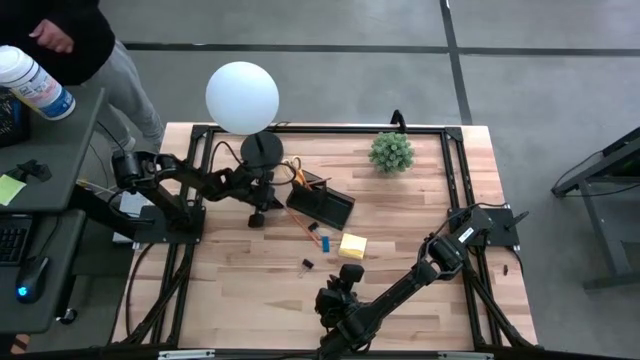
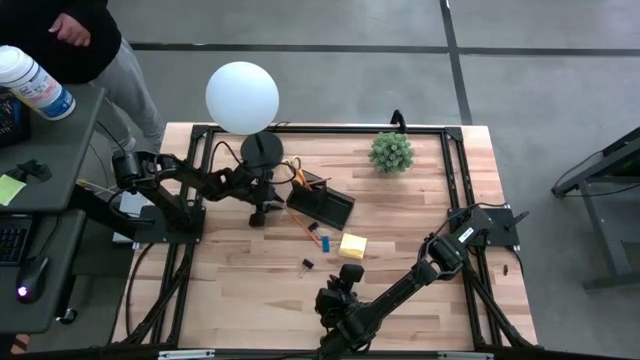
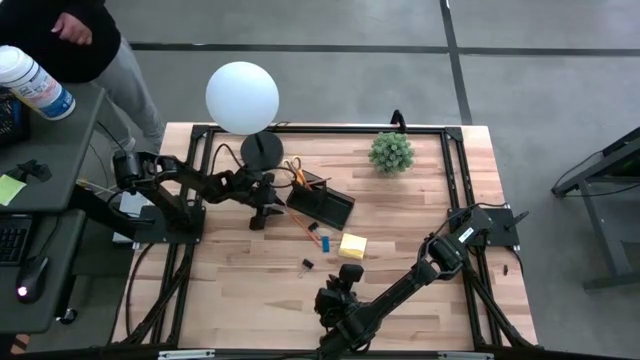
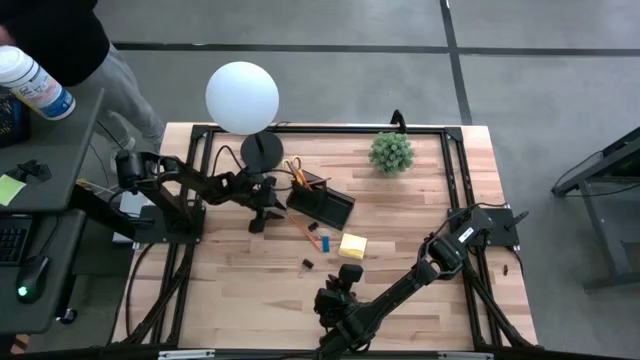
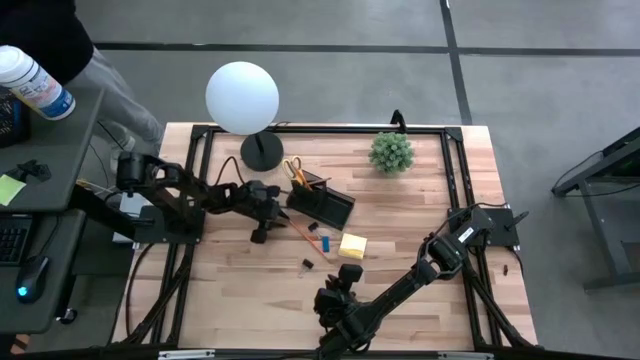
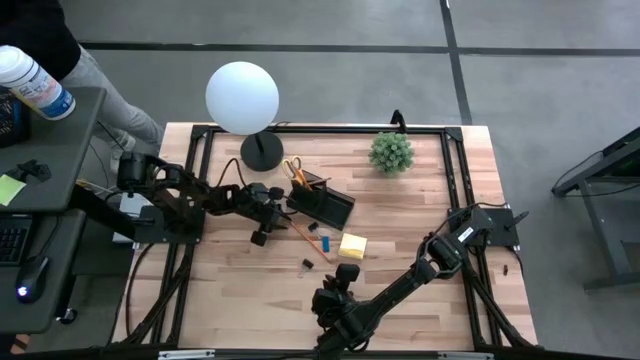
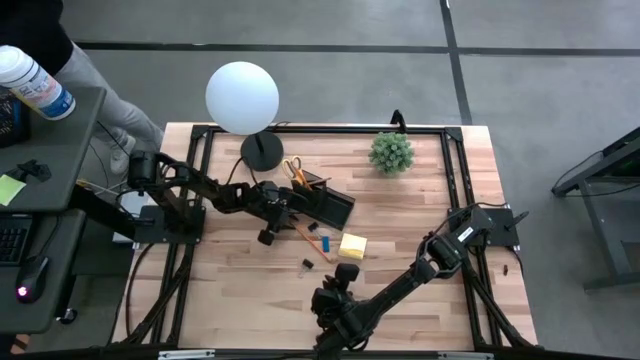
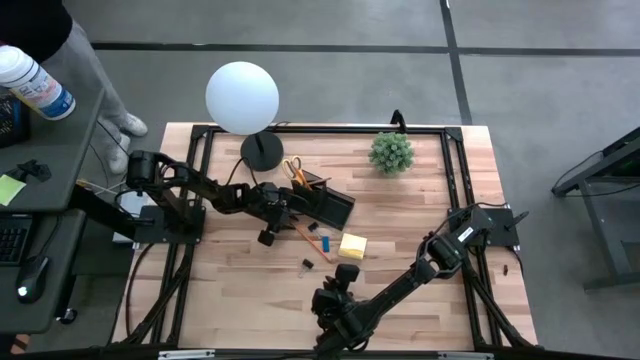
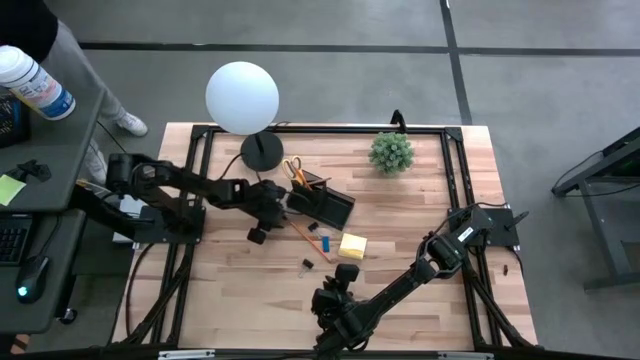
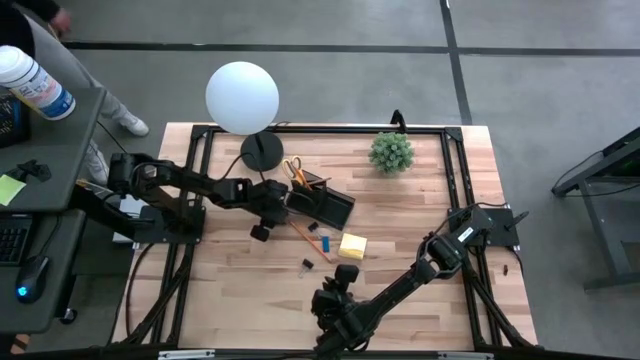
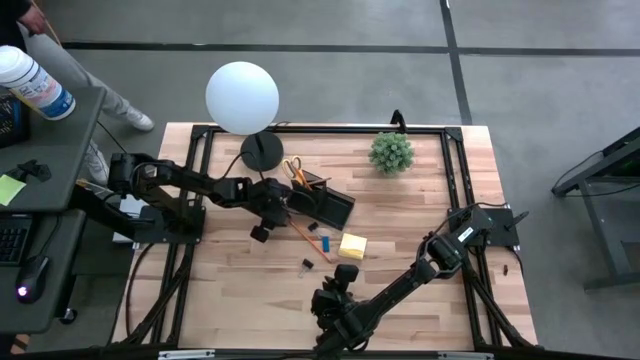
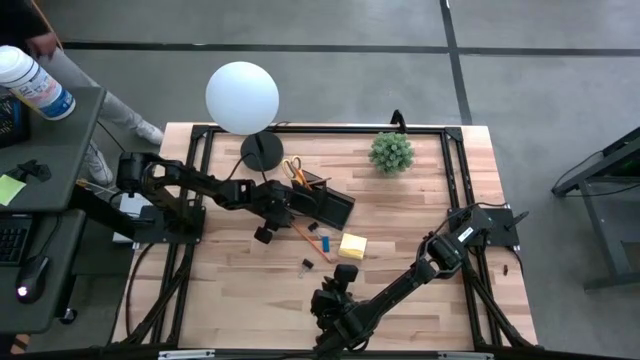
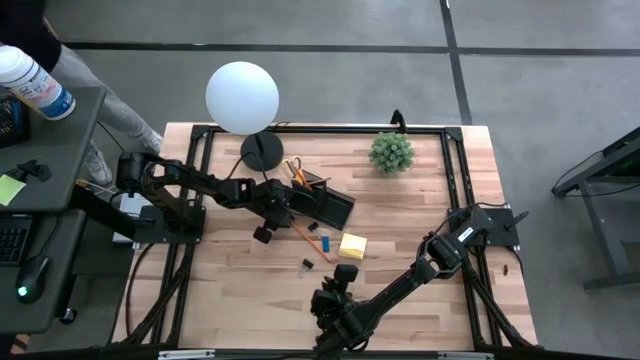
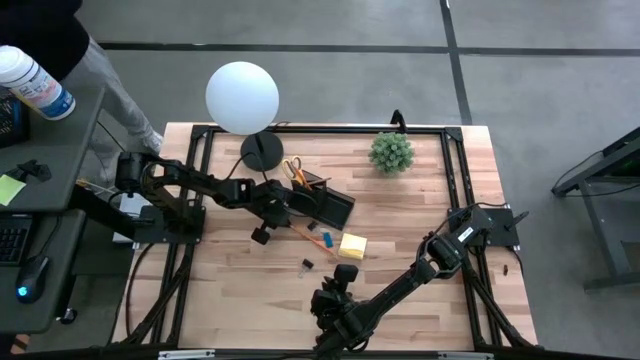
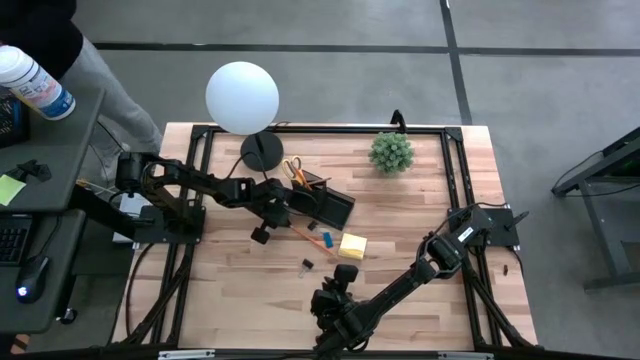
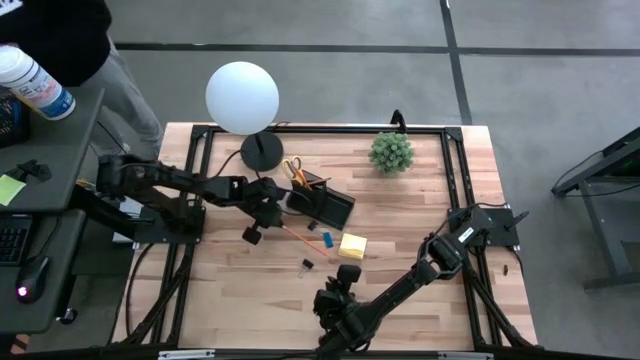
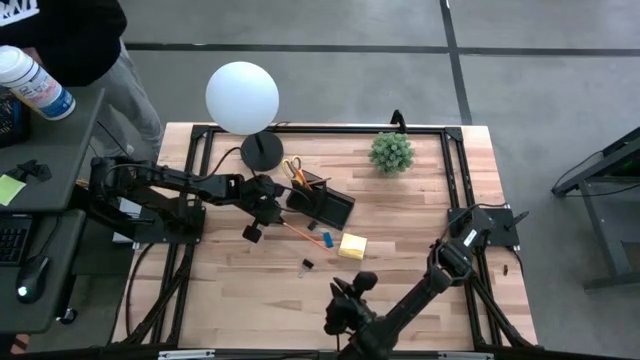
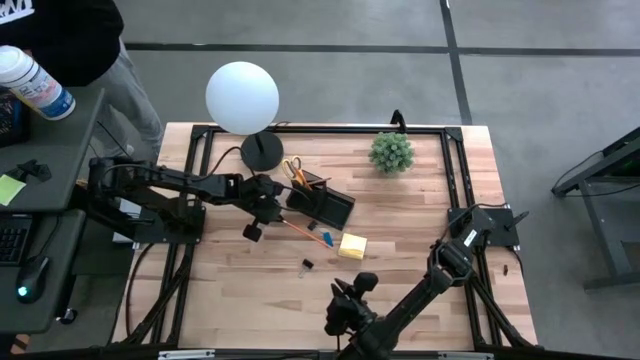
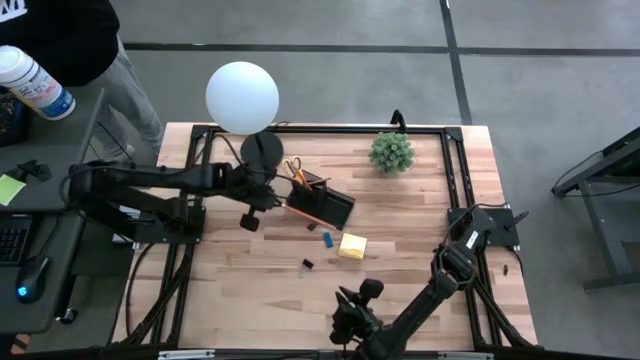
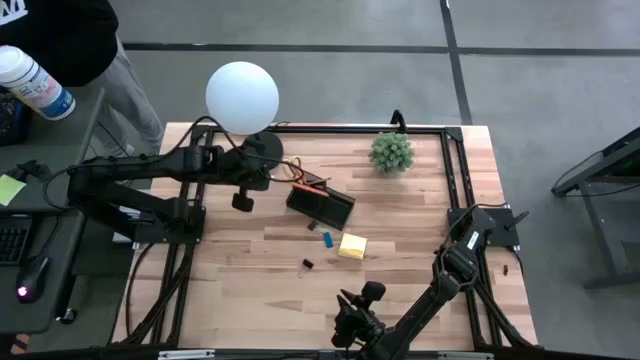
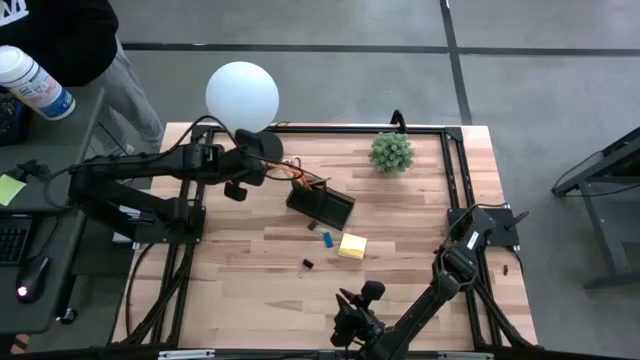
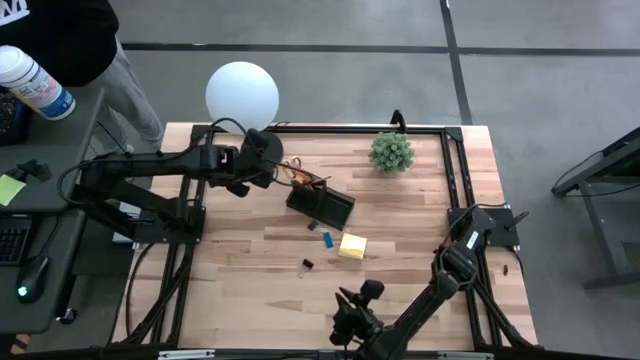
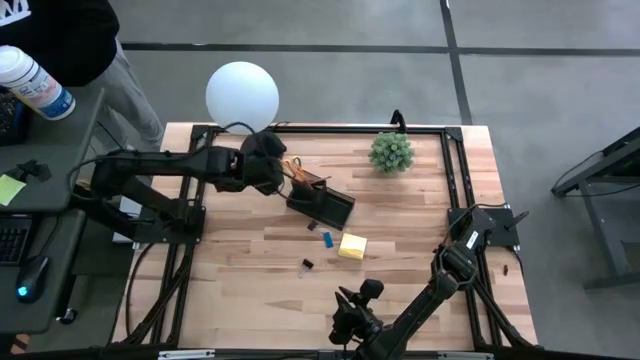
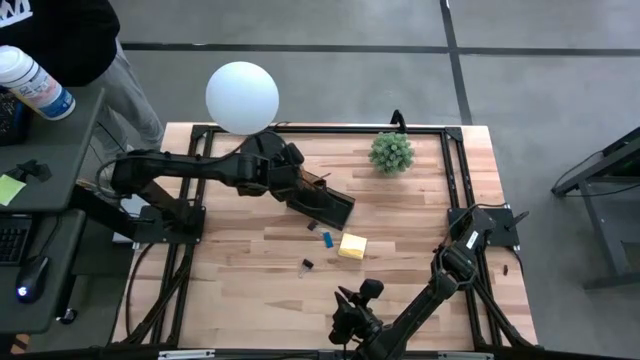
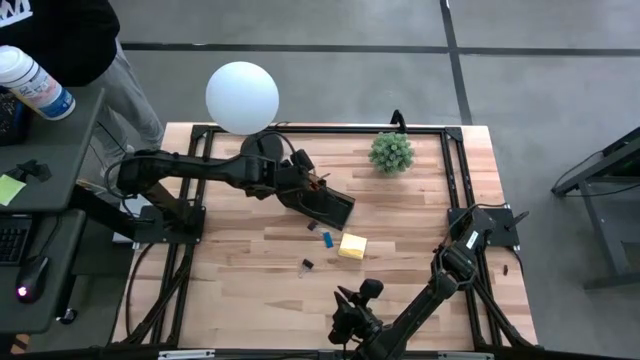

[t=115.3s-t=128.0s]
Task: Pick and place office supplies into organizer
Put the yellow pencil into the black organizer

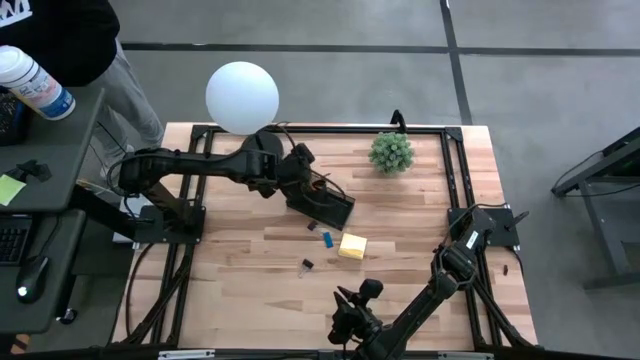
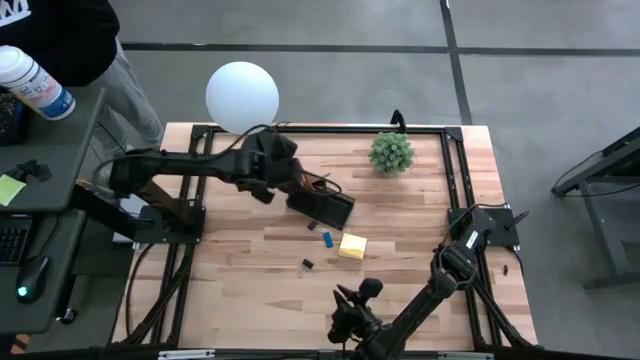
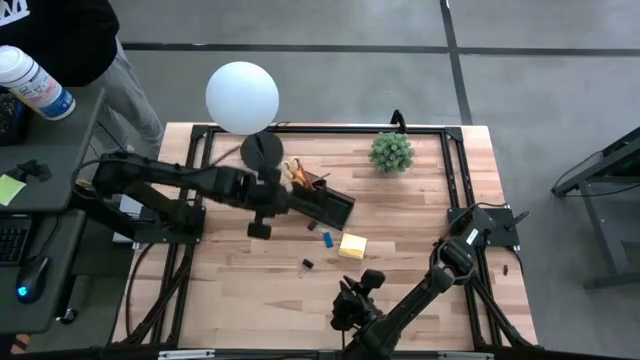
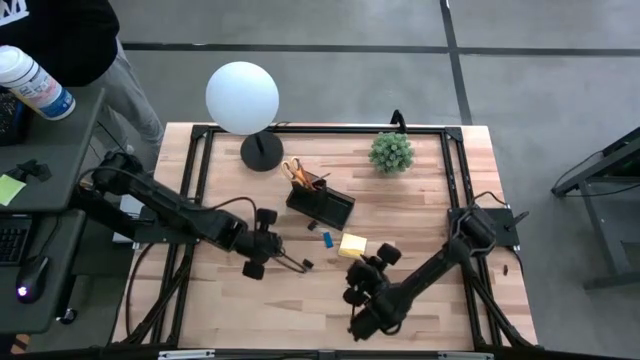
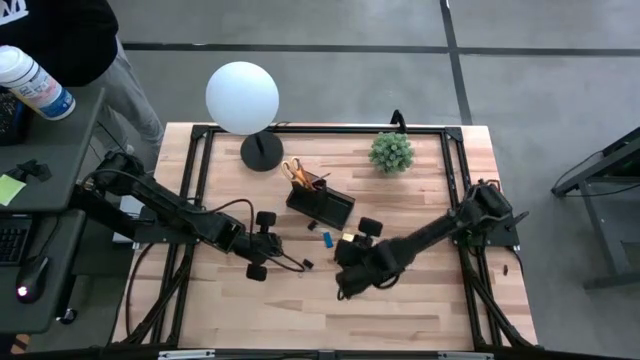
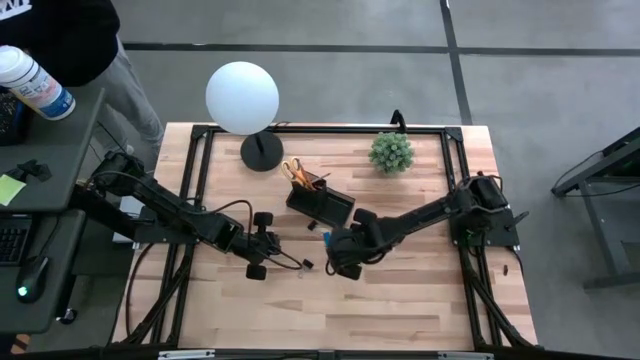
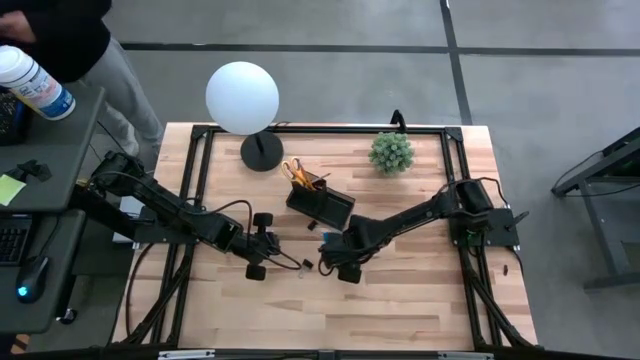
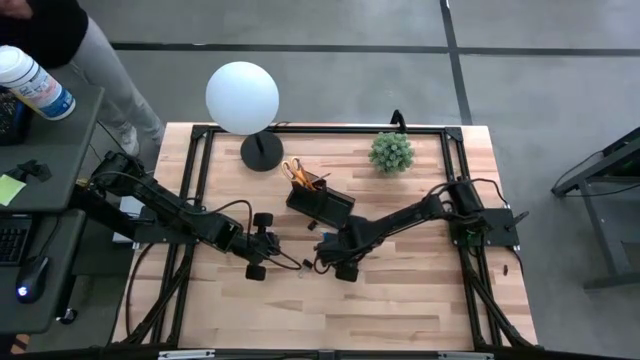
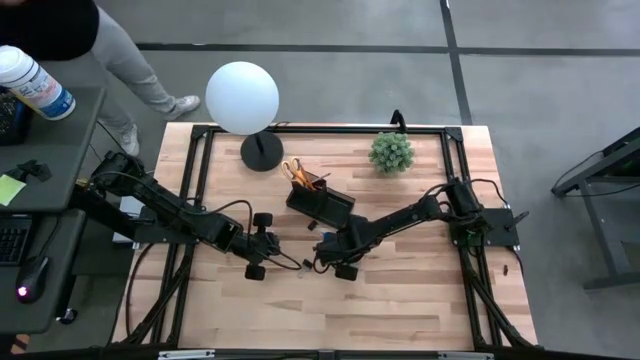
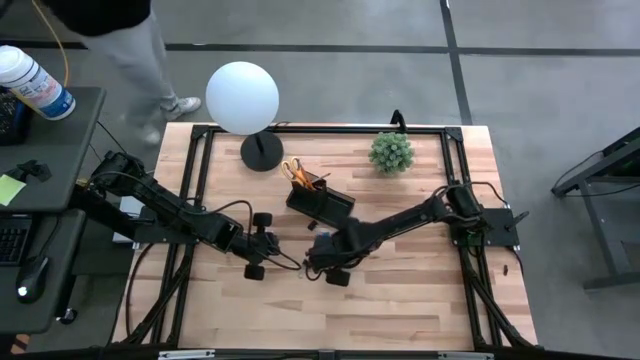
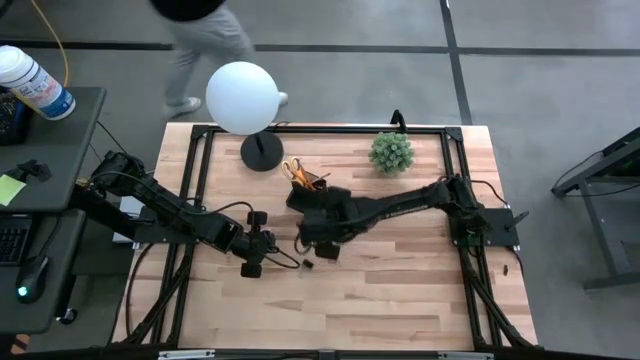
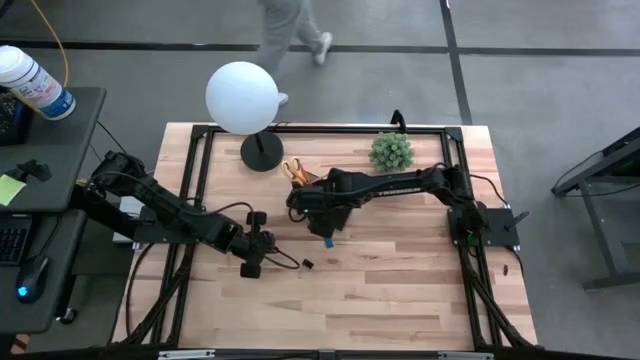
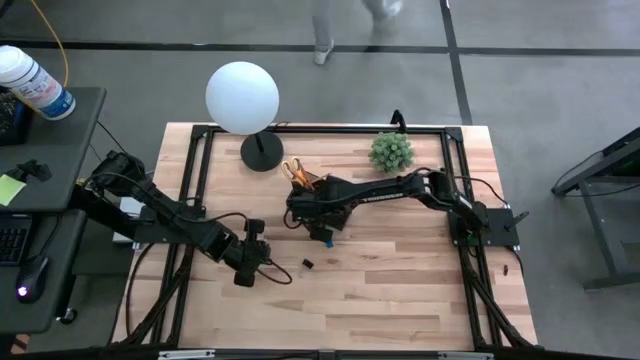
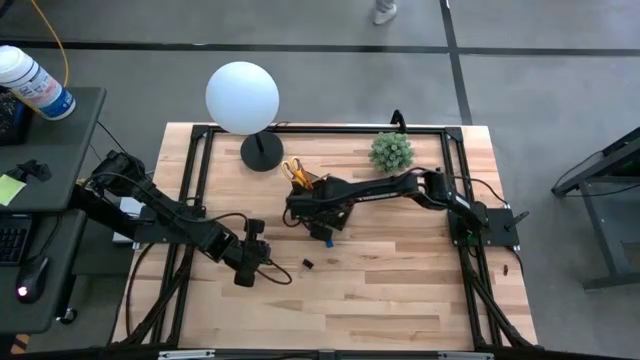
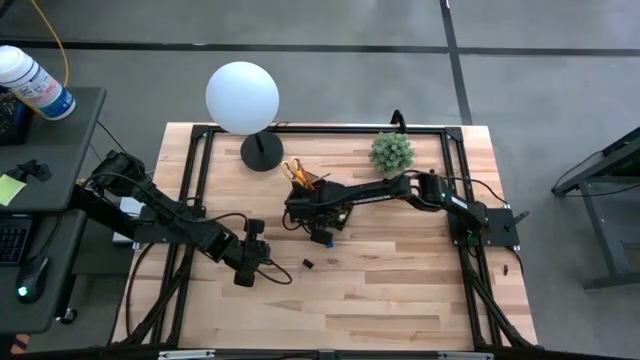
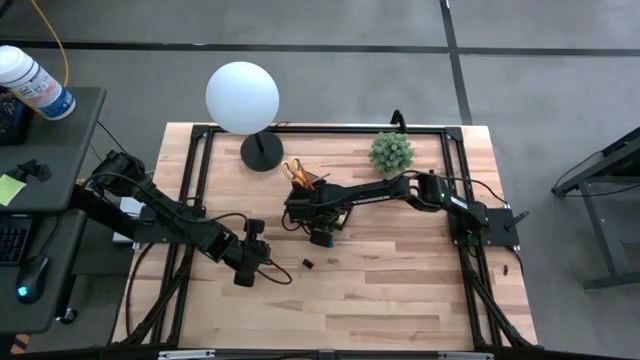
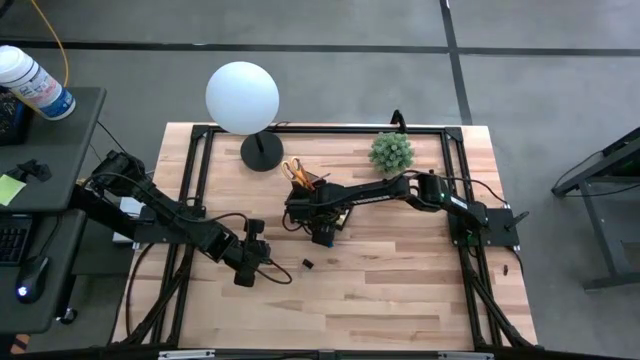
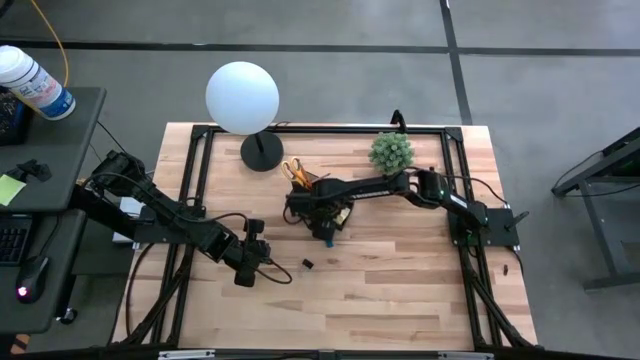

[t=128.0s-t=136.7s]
Put the yellow sticky notes into the black organizer

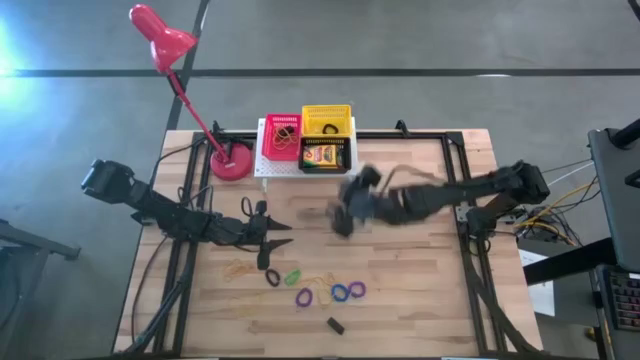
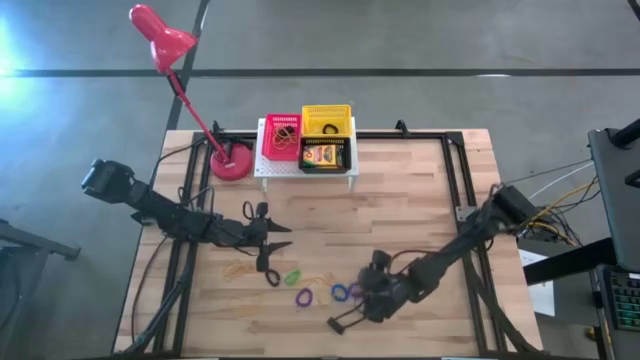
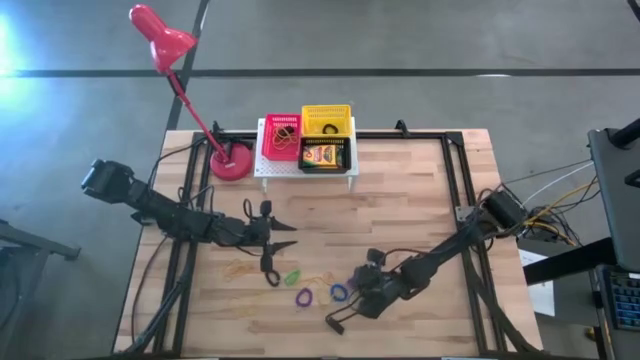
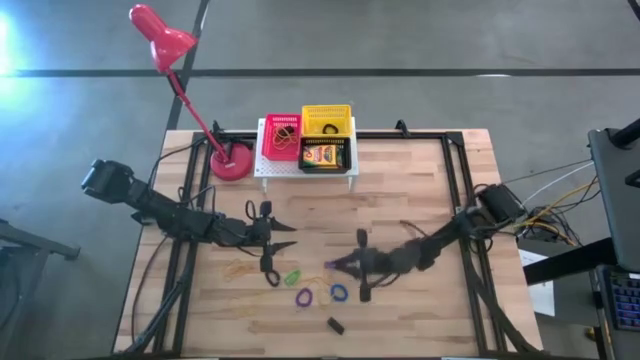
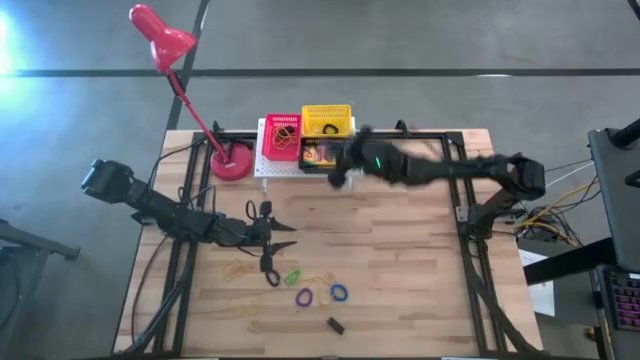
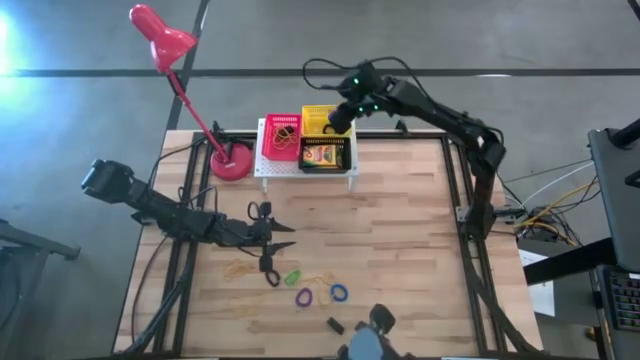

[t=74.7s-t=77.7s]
Task: Pick & Place Office Desk Supplies
Put the right purple spring keychain into the yellow bin on the shelf
